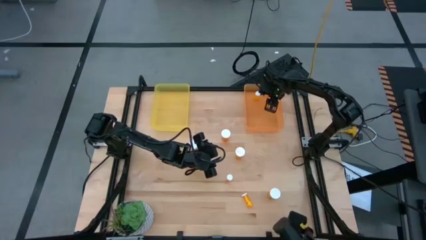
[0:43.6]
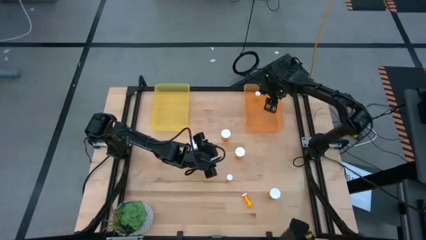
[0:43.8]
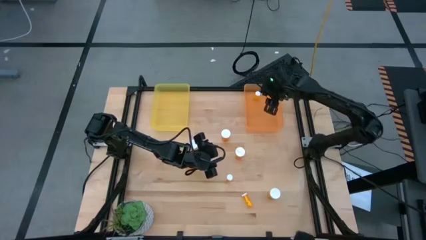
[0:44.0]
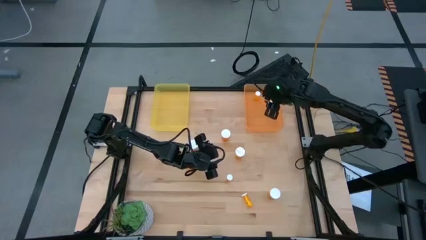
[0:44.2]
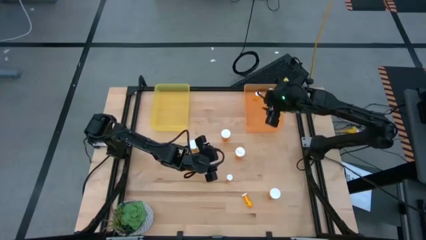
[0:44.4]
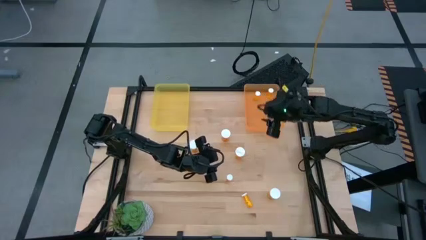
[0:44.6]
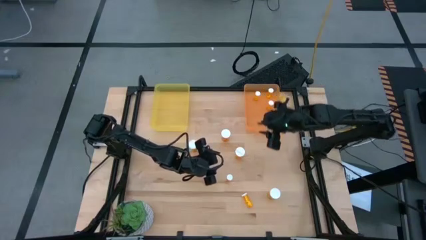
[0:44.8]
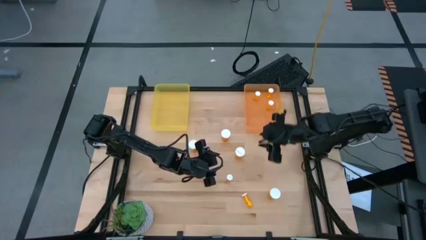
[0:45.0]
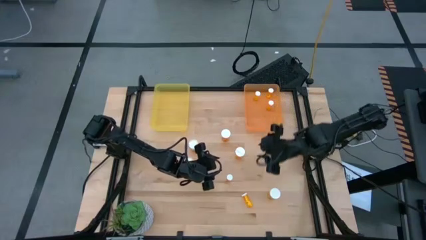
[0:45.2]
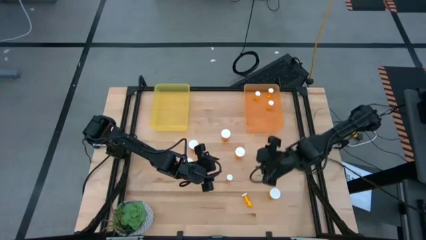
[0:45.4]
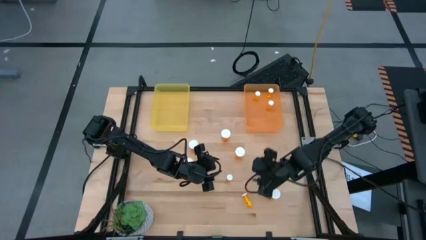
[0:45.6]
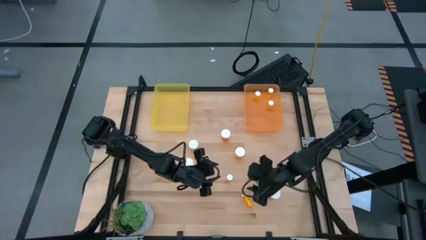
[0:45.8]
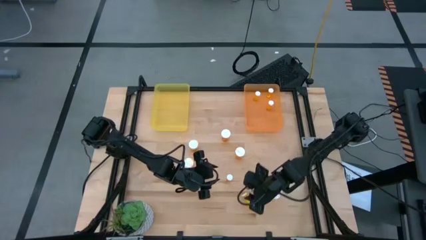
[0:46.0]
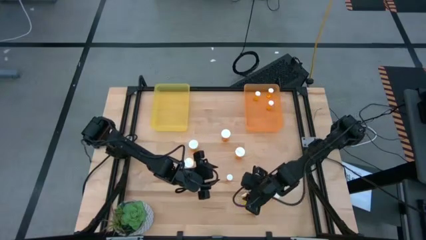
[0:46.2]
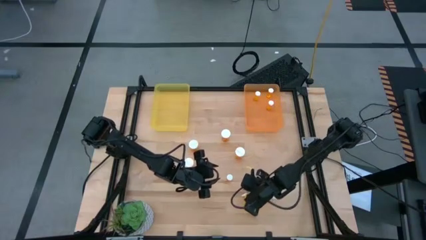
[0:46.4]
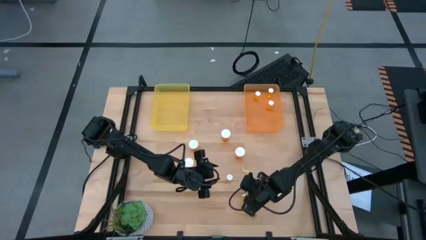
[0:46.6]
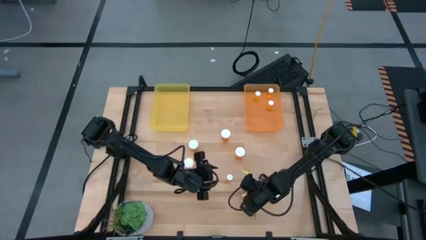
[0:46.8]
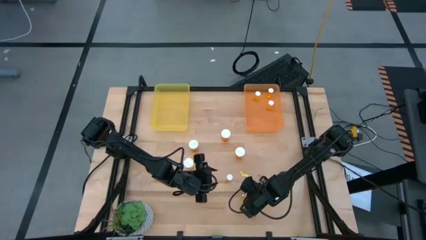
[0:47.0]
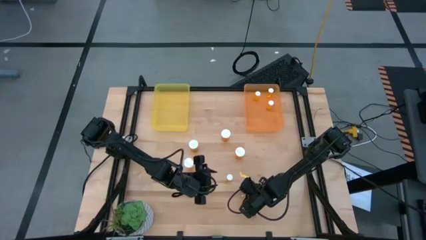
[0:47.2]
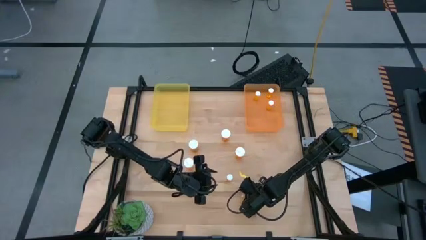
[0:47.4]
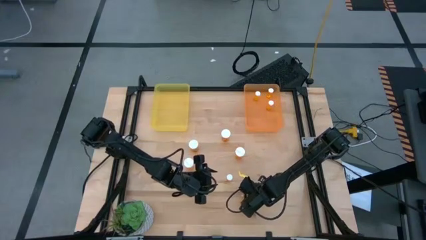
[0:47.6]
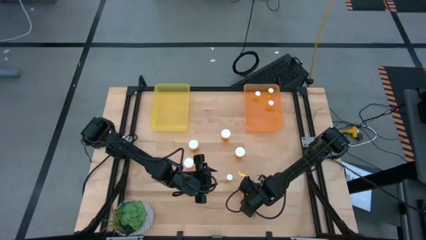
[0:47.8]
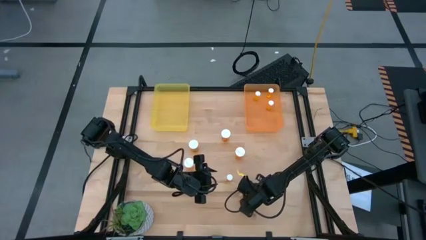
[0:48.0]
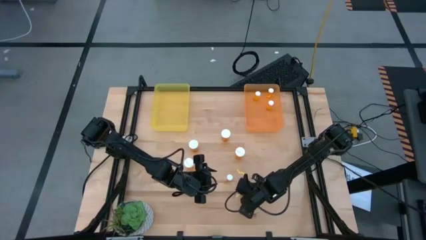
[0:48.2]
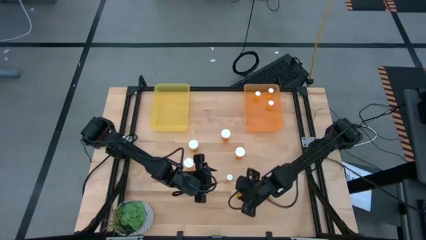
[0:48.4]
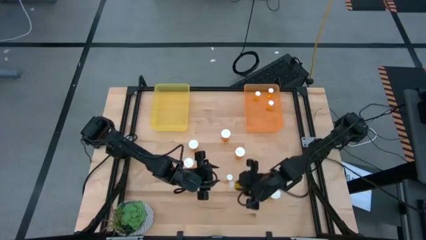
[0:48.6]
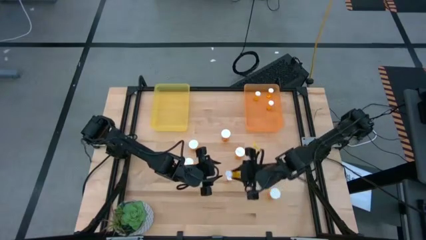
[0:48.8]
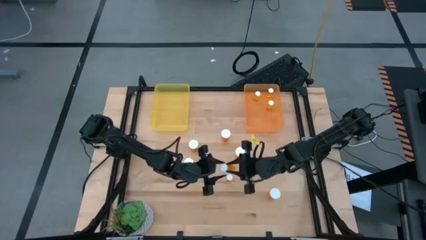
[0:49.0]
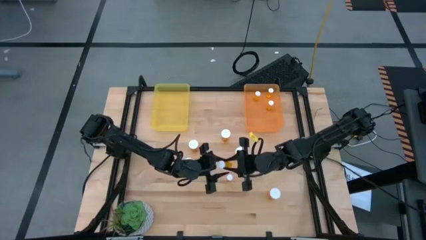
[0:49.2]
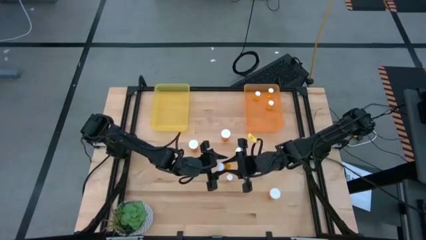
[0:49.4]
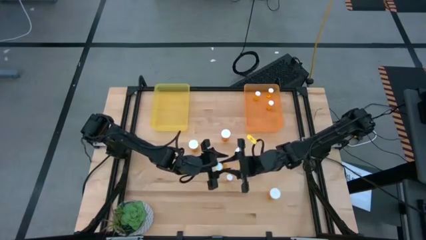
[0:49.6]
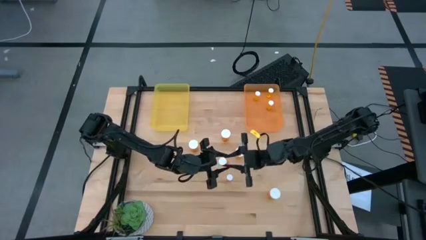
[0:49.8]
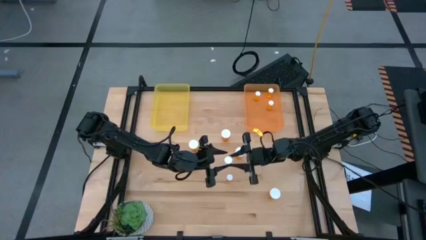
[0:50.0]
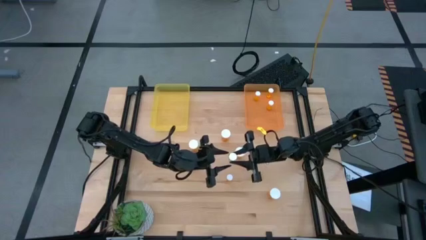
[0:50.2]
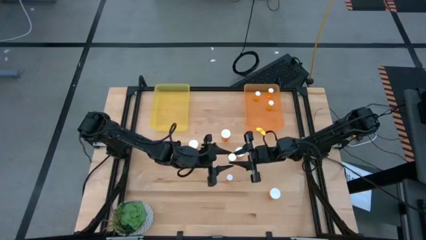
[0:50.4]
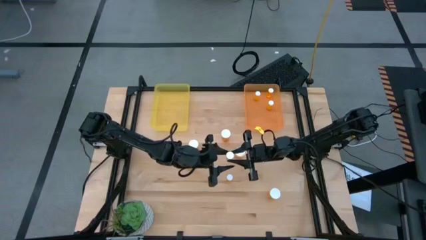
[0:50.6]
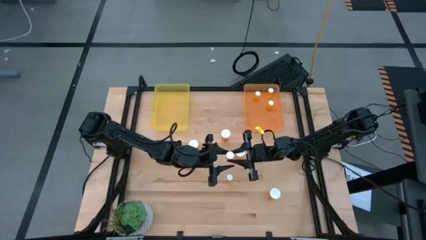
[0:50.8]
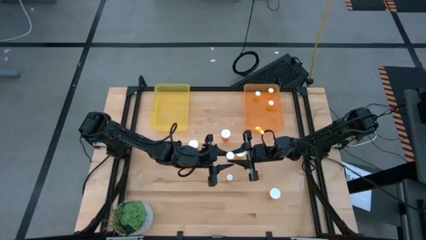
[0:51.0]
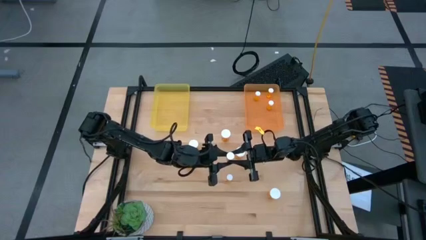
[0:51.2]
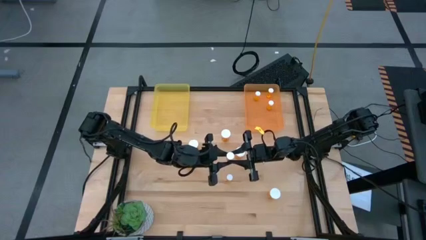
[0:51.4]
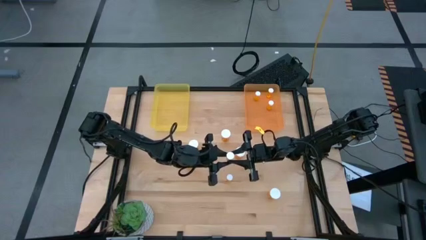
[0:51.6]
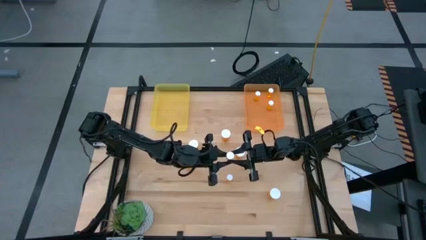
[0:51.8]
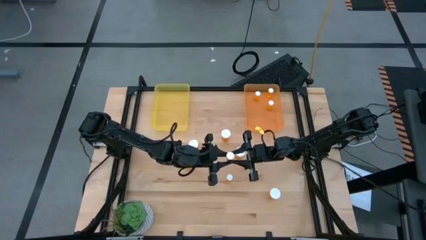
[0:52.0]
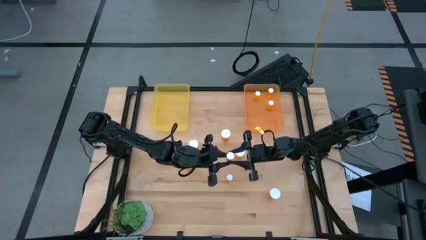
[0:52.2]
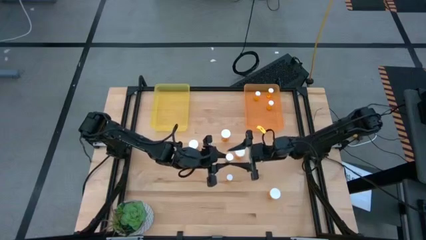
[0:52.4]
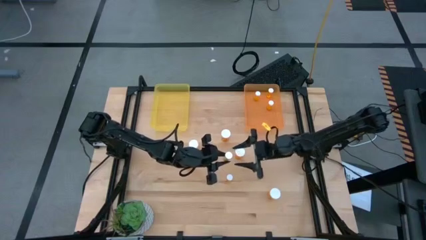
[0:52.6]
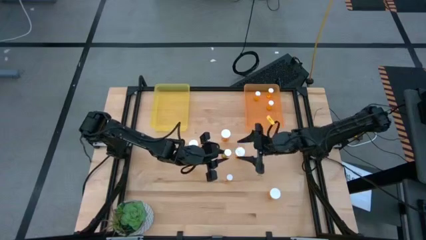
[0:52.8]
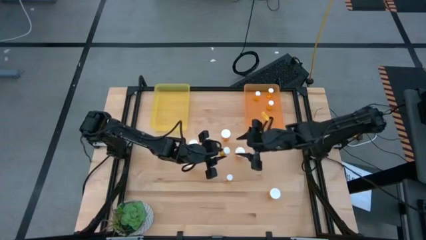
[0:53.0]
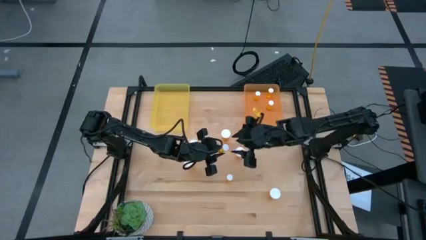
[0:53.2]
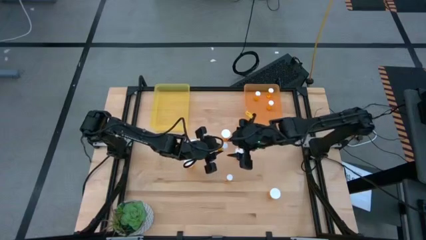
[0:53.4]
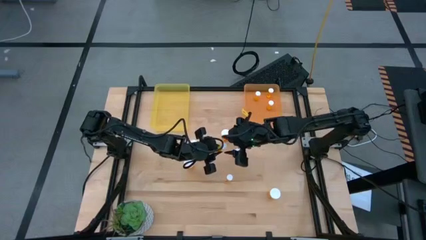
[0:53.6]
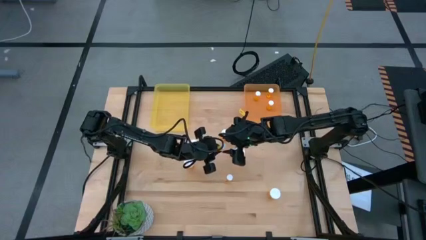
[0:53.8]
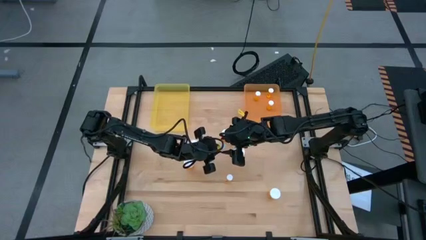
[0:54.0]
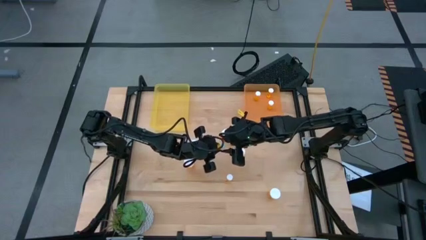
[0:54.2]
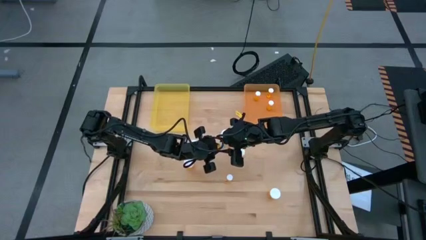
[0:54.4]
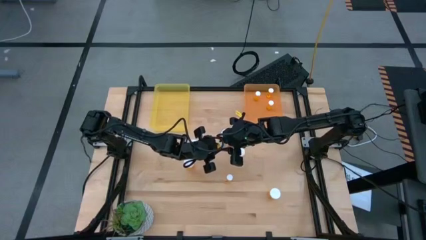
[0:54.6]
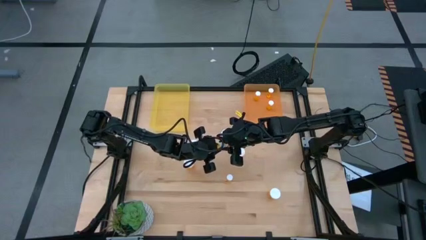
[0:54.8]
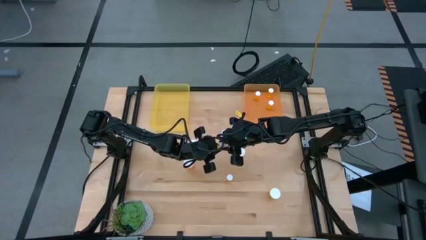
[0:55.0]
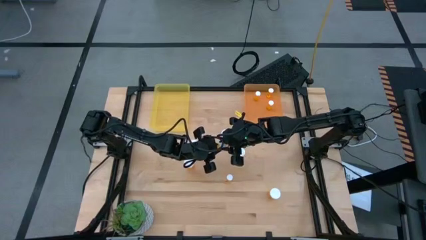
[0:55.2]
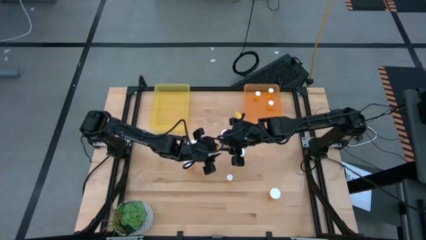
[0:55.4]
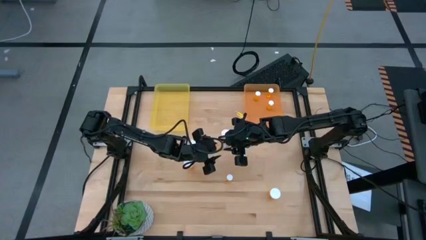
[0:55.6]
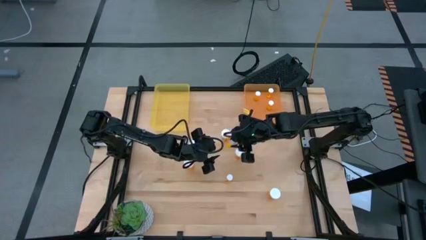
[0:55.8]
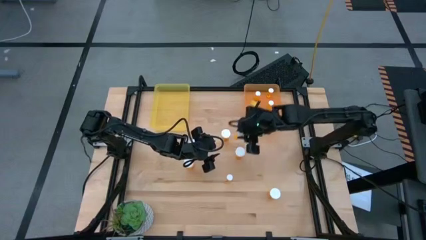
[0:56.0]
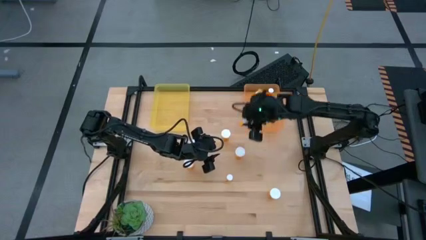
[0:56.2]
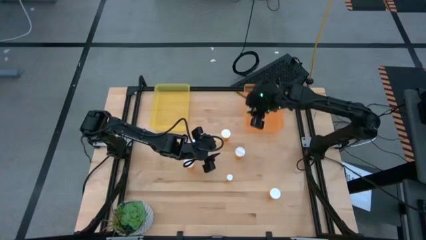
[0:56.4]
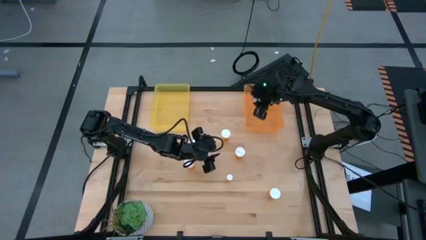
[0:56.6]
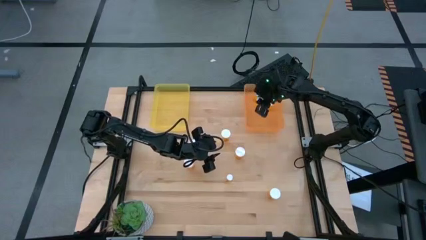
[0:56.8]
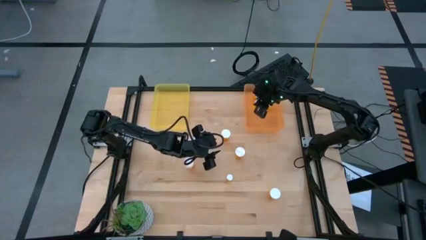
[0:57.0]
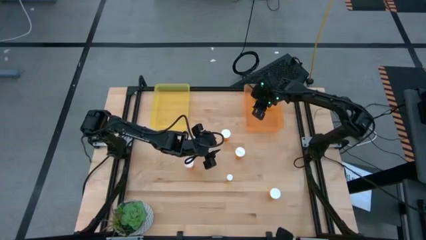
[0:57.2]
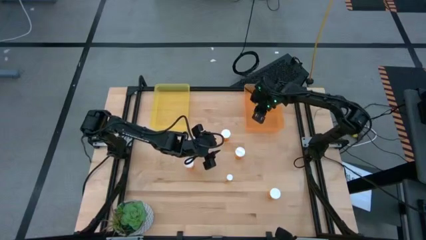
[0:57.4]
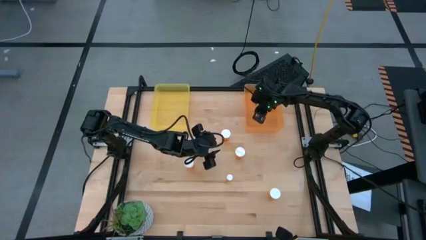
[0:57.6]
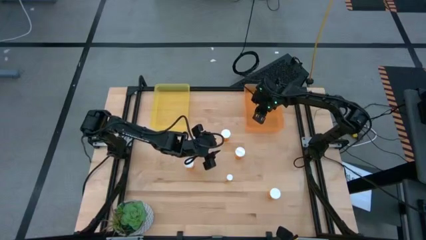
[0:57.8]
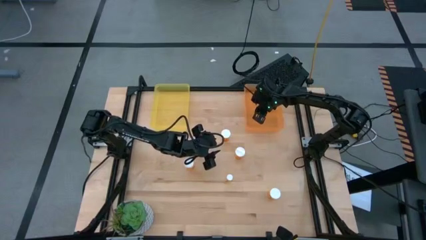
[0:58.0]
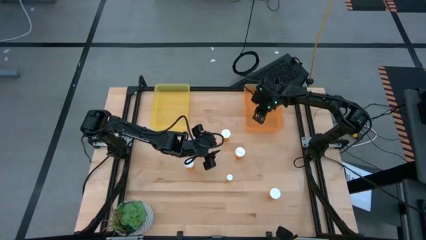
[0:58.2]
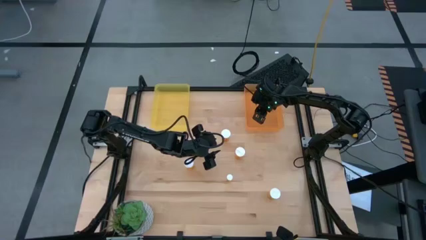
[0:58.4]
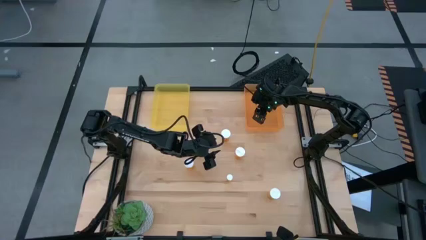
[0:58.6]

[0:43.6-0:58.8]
Task: Pick and place medicine bottles into bin by pill shape (circle, oval)
Put the small orange pill bottle into the orange bin
